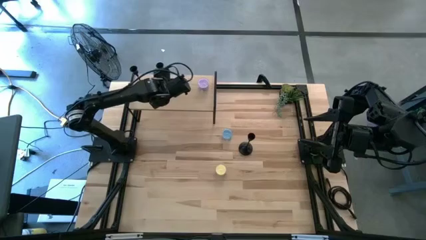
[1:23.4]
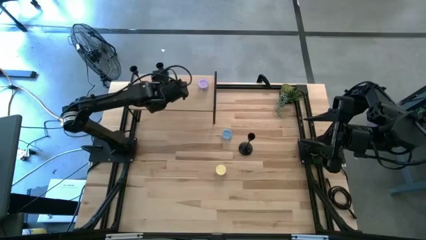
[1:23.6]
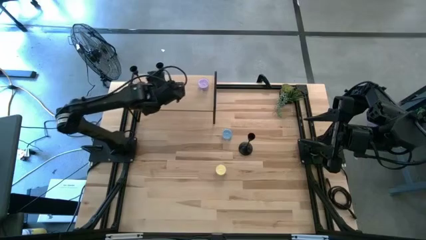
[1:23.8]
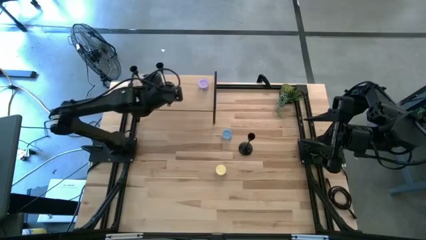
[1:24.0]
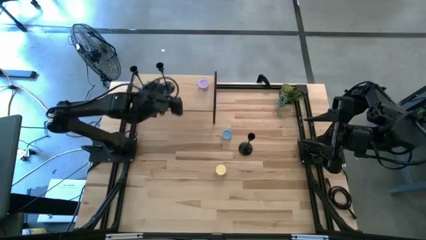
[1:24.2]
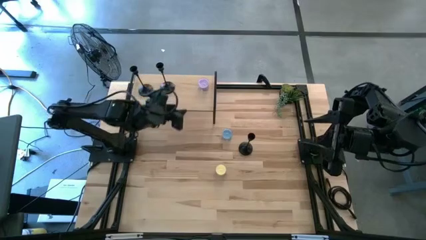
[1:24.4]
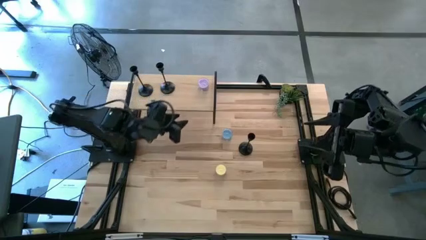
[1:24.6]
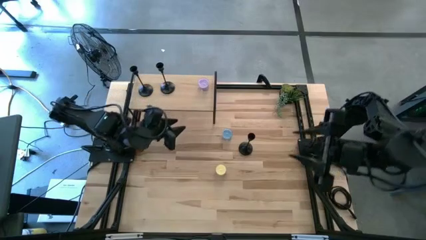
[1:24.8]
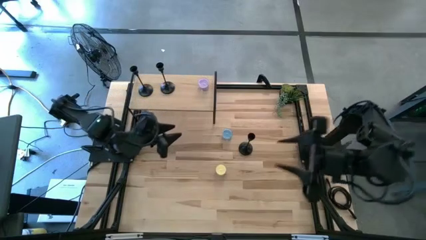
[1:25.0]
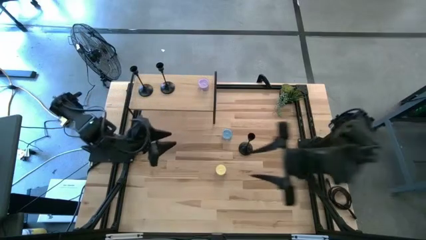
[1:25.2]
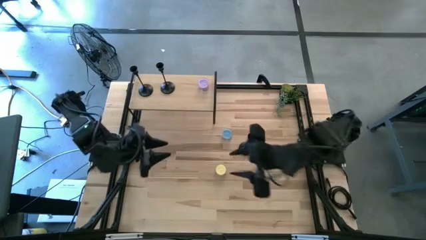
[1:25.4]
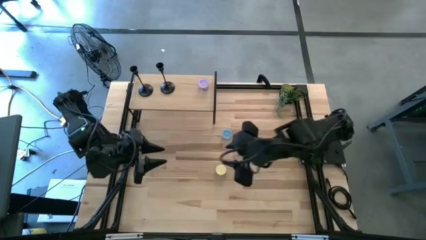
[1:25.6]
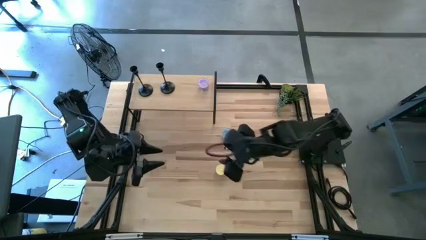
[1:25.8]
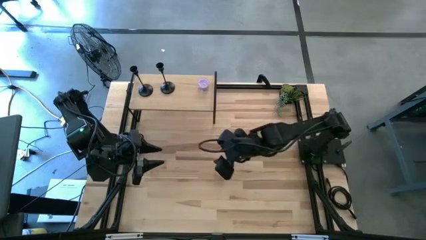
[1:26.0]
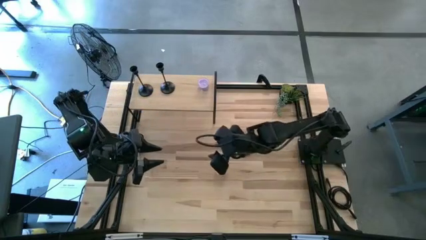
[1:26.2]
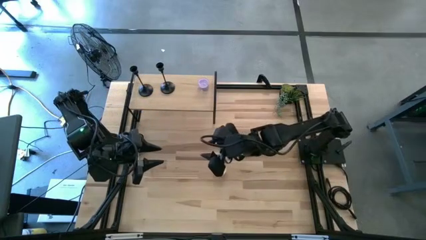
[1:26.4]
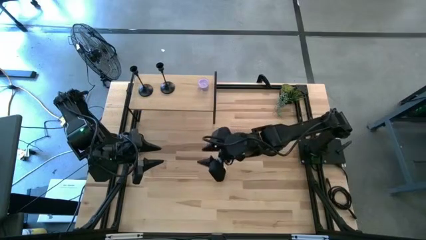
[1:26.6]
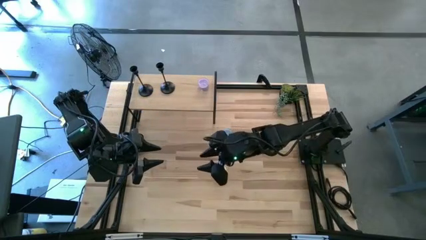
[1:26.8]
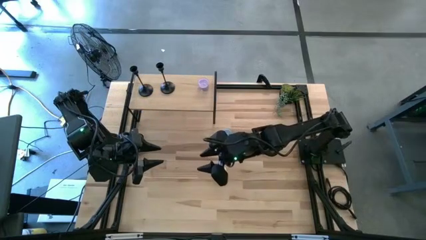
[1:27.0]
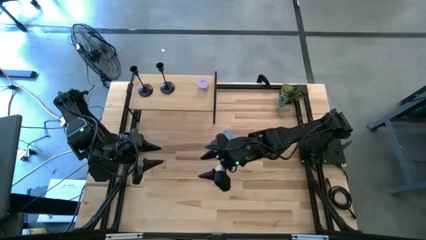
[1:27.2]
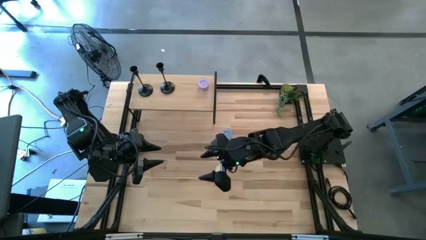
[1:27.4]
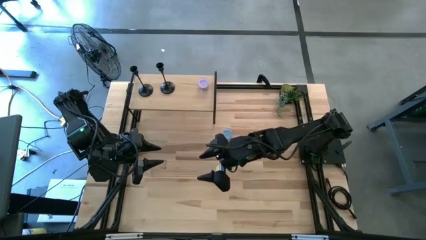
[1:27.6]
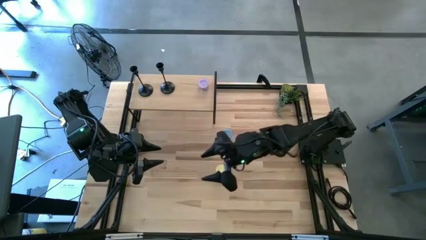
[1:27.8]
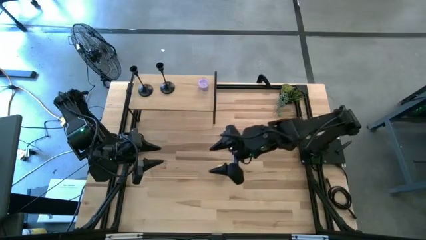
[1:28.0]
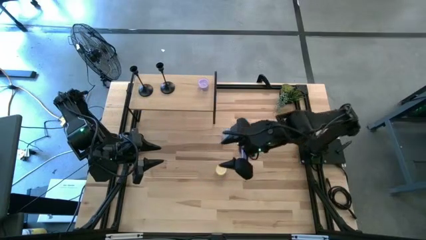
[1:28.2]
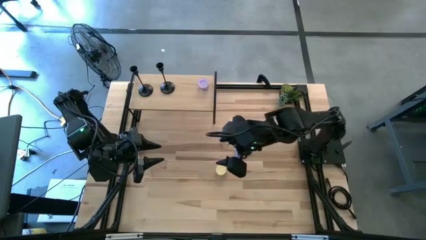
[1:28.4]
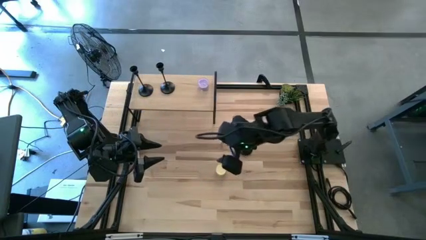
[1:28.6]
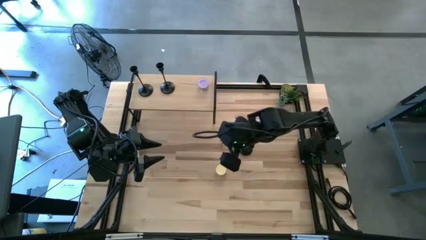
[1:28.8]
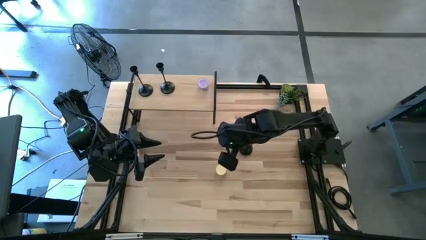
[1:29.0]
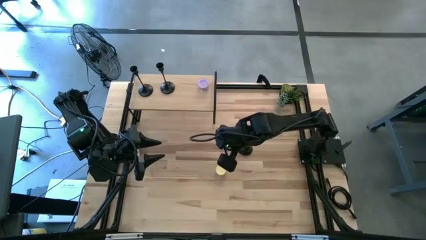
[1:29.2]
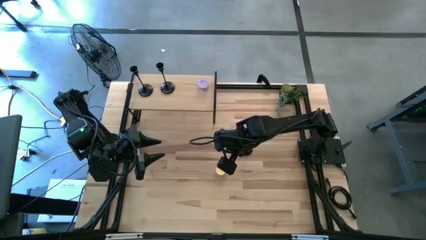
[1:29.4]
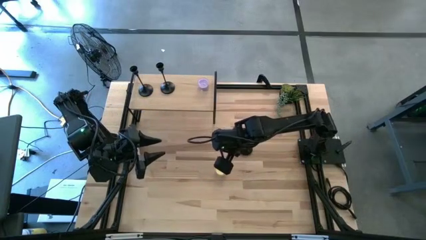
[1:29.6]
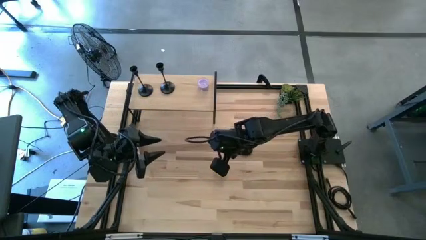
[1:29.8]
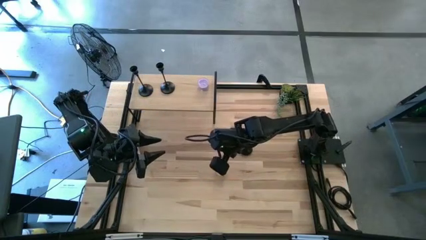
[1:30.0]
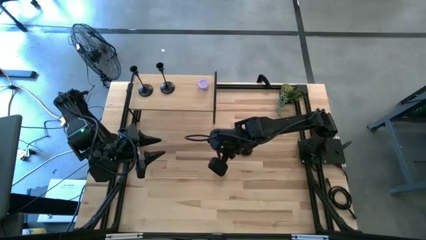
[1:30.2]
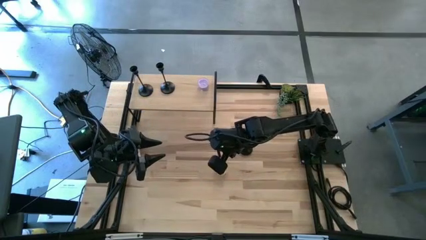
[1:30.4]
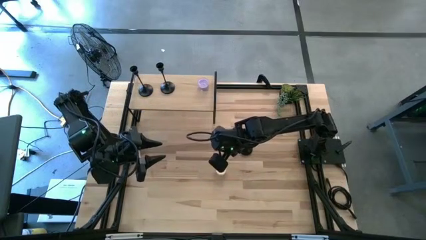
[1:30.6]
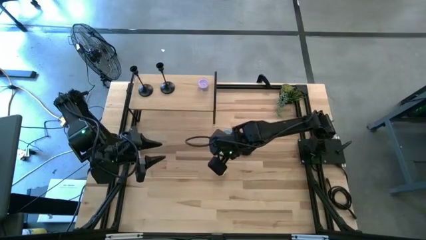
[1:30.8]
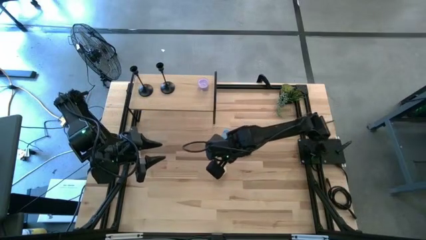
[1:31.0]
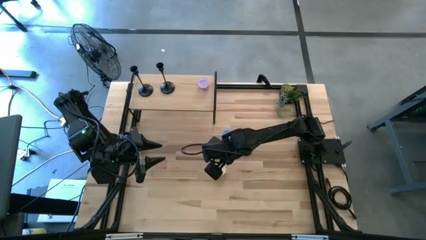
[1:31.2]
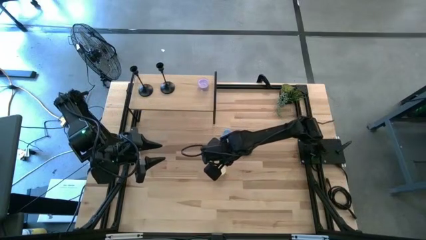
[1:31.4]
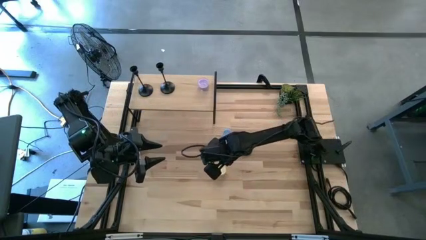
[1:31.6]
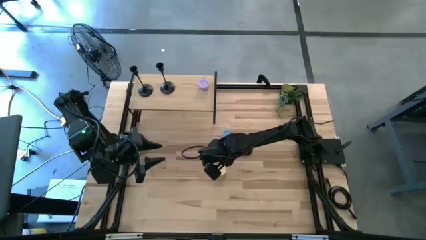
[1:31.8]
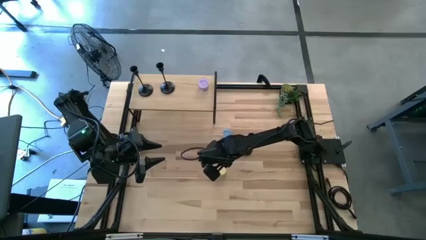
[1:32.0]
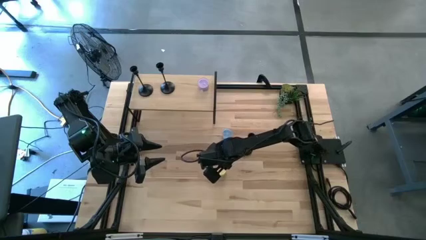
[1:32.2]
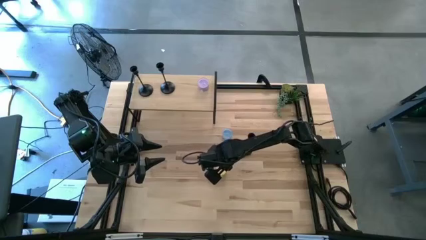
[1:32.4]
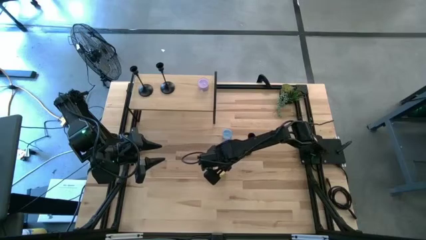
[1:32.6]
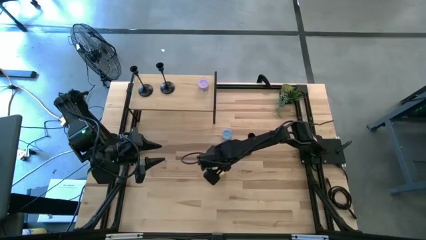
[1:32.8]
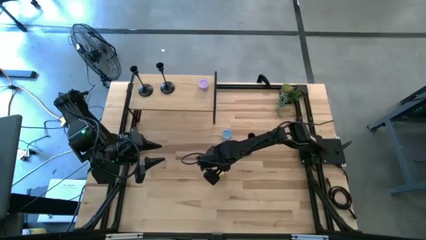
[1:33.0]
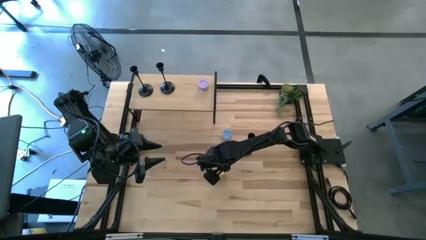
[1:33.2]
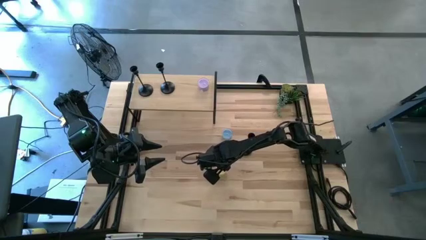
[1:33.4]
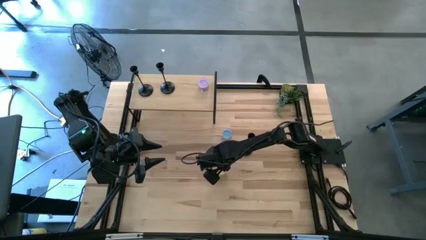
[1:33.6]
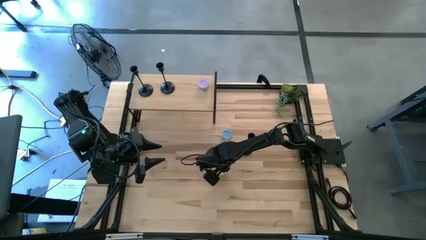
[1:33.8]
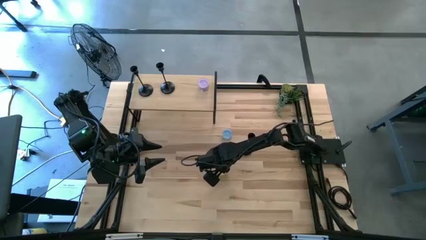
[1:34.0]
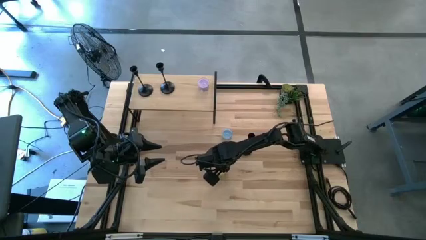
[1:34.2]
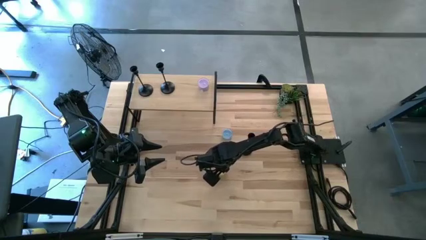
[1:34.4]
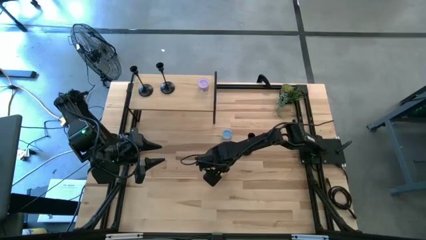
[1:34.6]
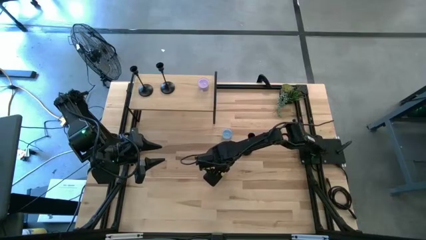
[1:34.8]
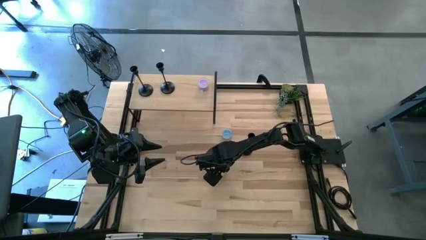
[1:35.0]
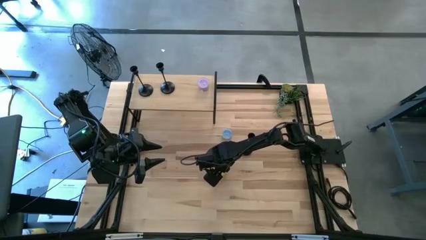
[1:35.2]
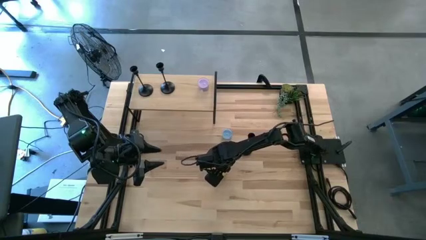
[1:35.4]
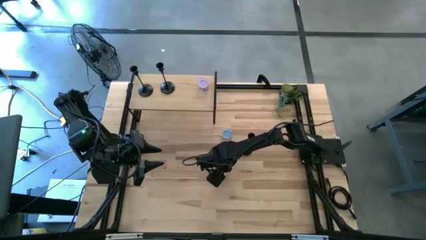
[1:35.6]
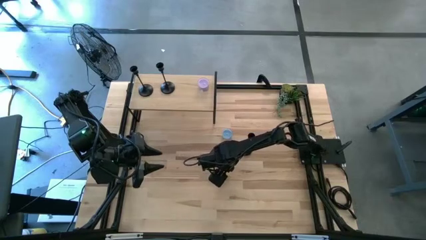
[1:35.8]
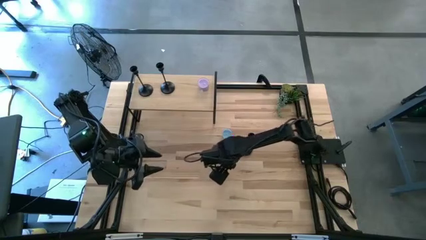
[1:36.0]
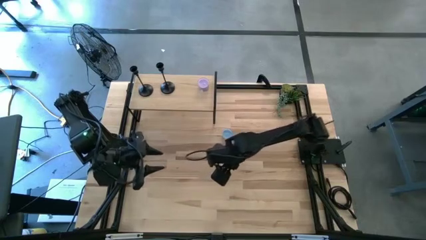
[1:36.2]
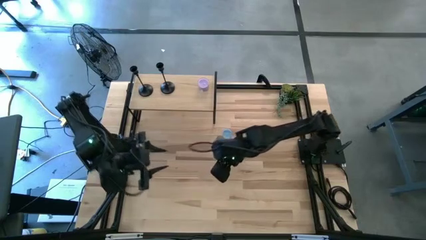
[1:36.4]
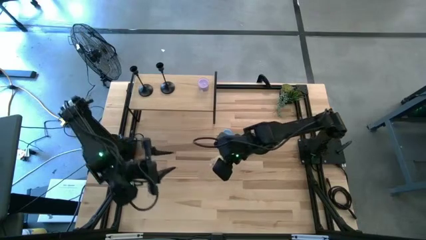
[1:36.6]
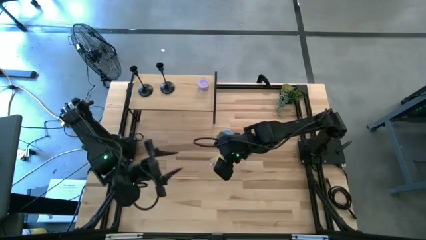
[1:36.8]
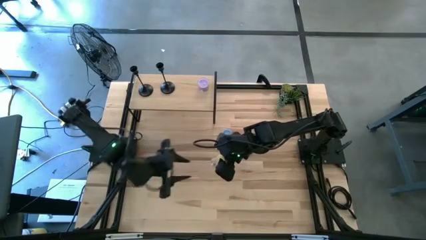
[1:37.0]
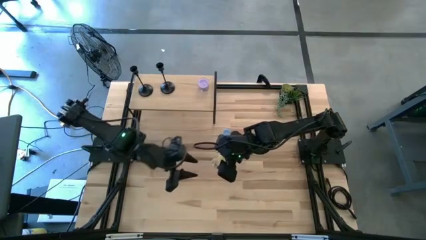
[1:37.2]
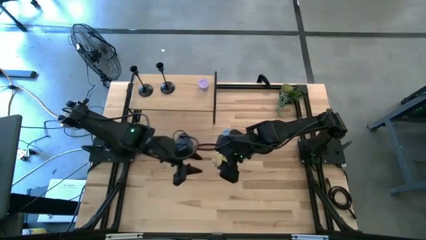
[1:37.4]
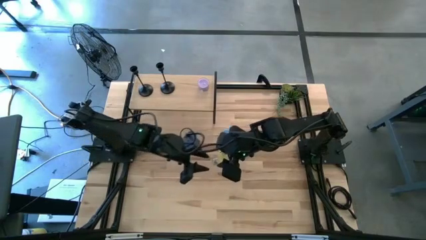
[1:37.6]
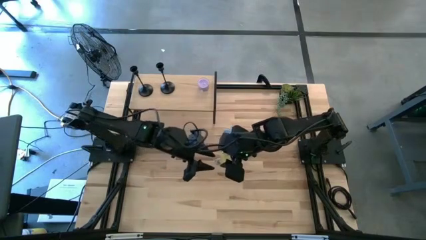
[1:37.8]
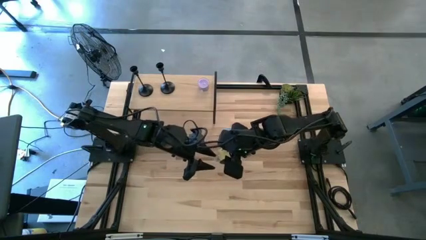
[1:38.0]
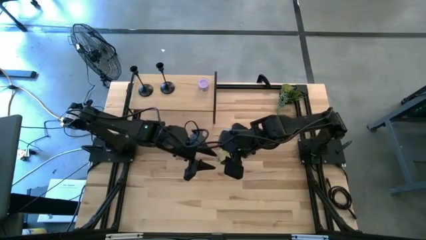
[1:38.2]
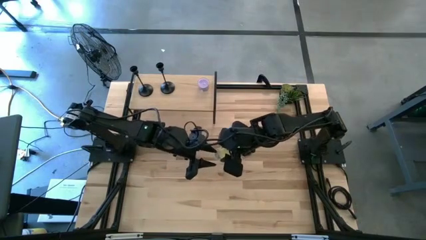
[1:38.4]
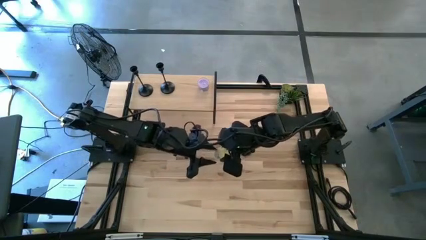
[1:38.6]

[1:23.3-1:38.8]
Task: Pick & Place candle stick holders
Put the yellow candle on the shelf

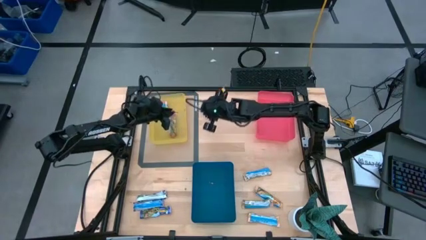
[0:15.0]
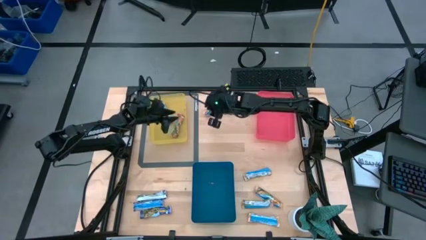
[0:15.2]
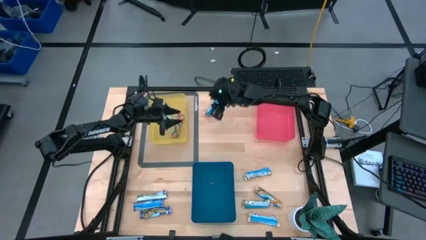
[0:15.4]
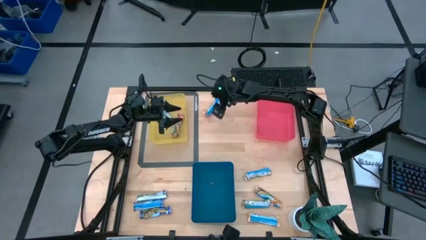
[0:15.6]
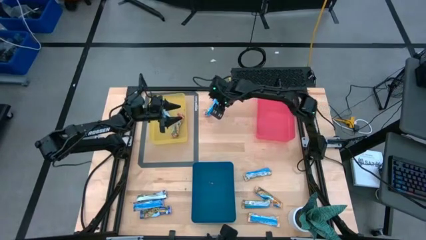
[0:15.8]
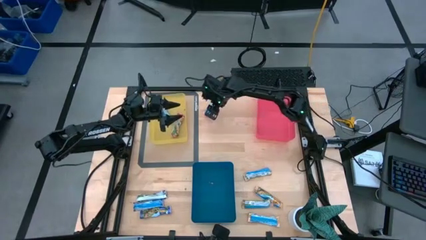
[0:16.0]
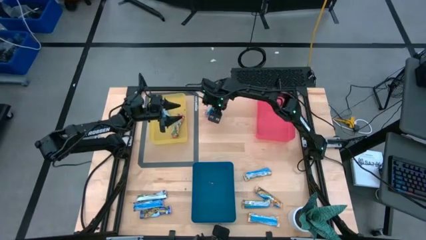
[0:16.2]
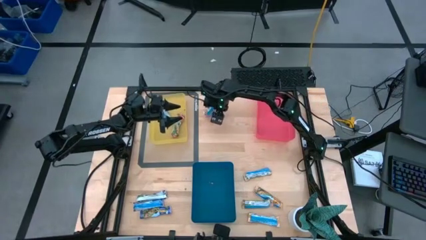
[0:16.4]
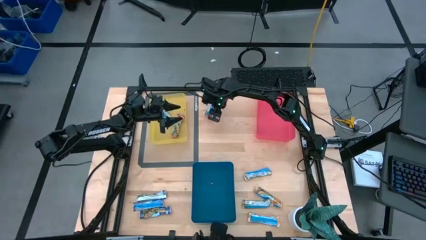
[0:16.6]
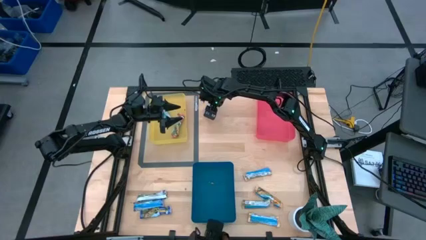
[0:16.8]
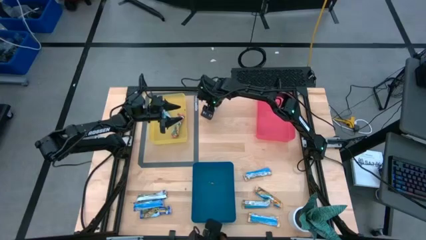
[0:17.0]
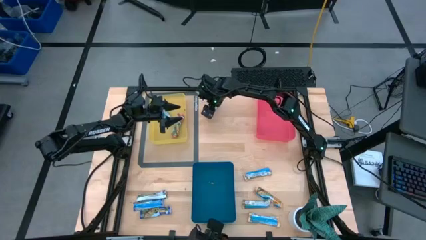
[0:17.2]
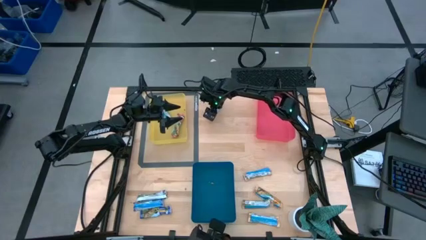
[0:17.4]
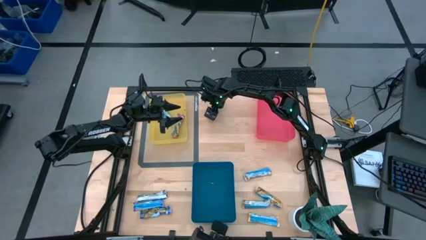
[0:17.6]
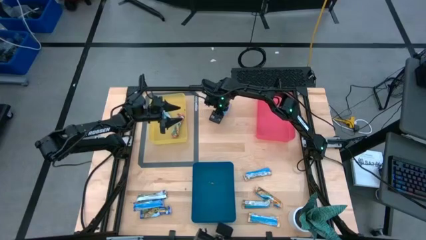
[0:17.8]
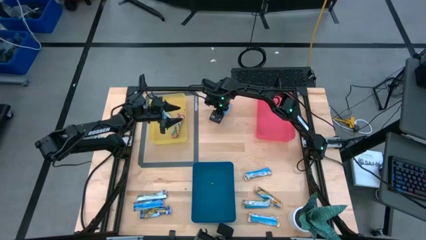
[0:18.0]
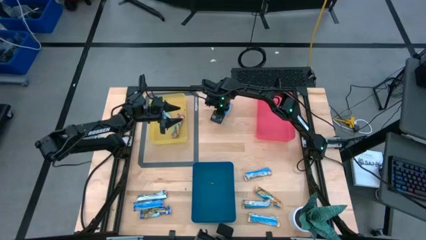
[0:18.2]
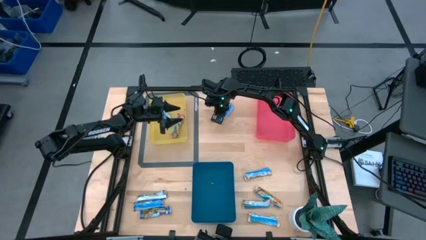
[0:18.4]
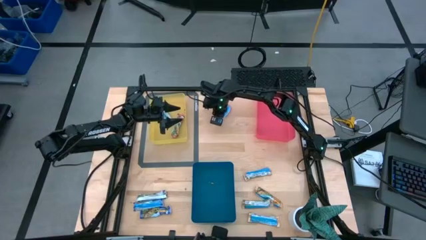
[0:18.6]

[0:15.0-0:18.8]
Task: Pick and place Granola Bars by type
Put the red granola bar into the yellow bin
